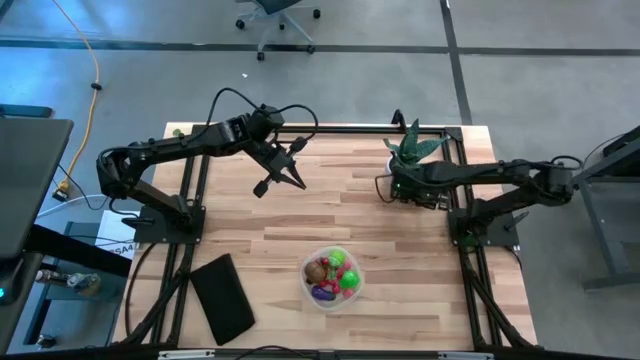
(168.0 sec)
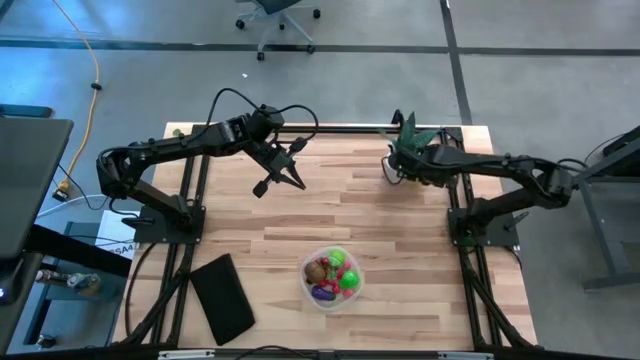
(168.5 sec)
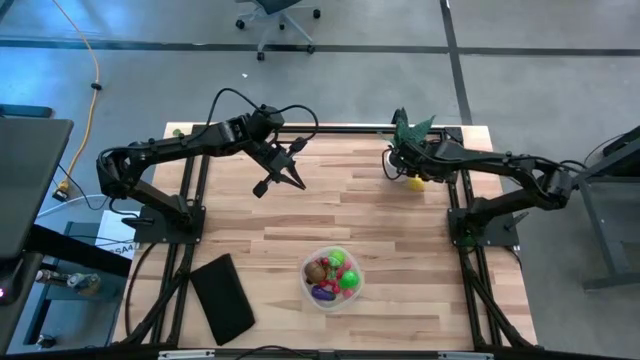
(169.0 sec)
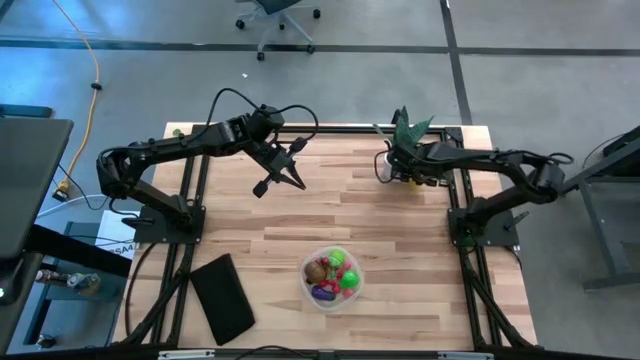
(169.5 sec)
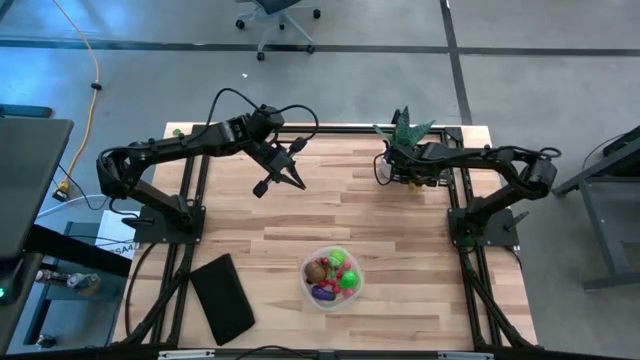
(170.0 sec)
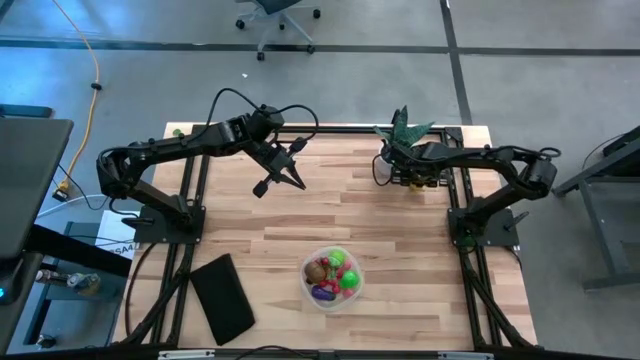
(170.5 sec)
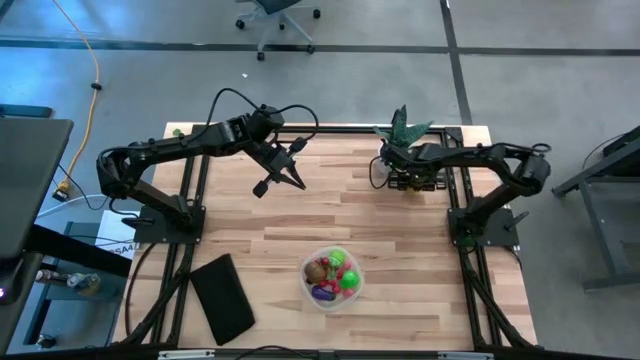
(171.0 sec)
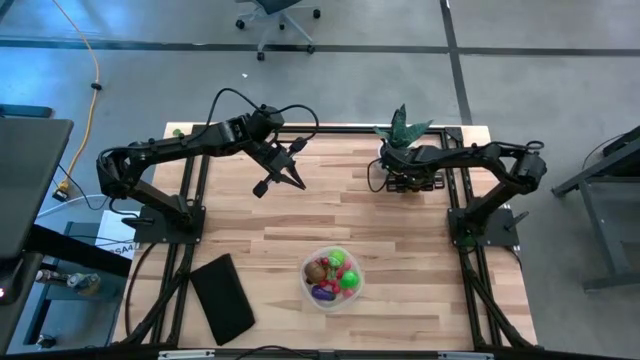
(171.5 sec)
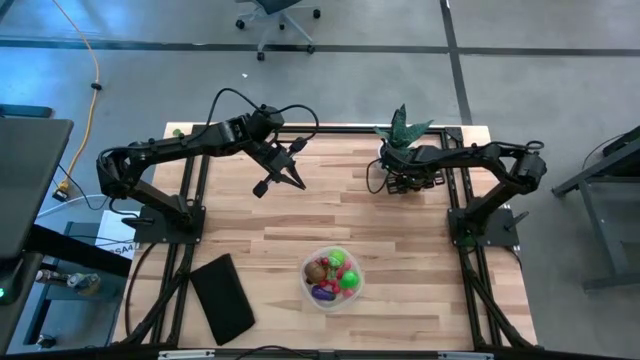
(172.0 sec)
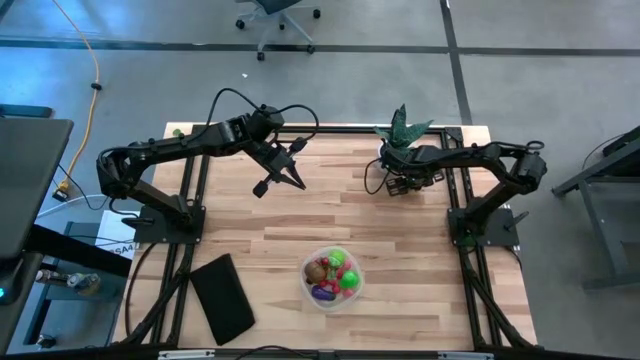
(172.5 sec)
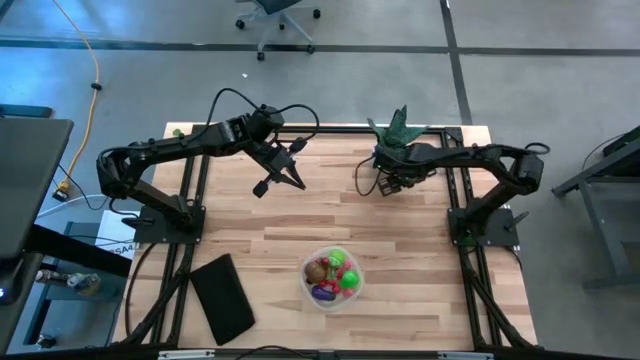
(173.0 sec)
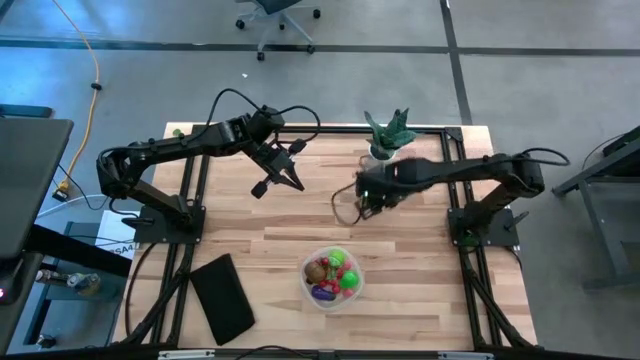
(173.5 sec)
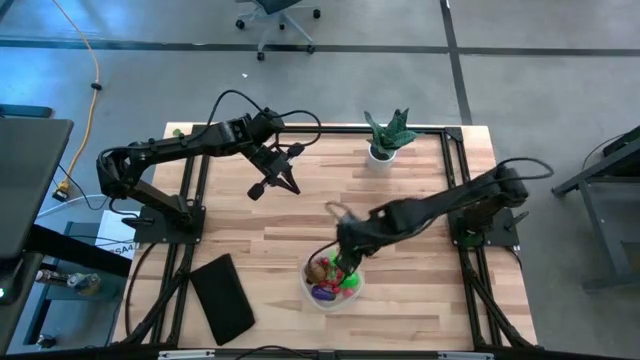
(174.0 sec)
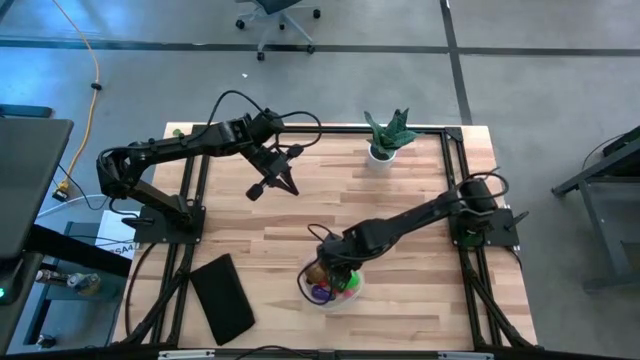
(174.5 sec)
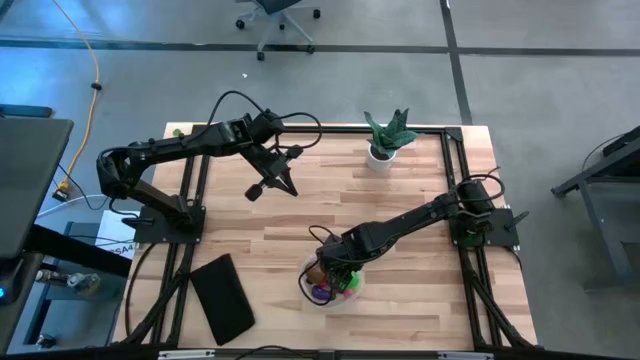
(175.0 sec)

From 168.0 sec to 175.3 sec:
Task: Pick and placing Produce into tupperware
Put the yellow lemon into the transparent container

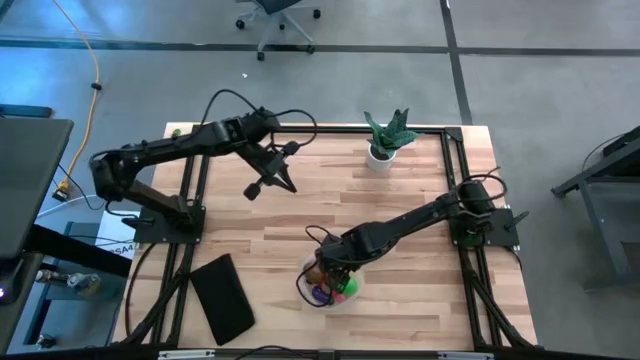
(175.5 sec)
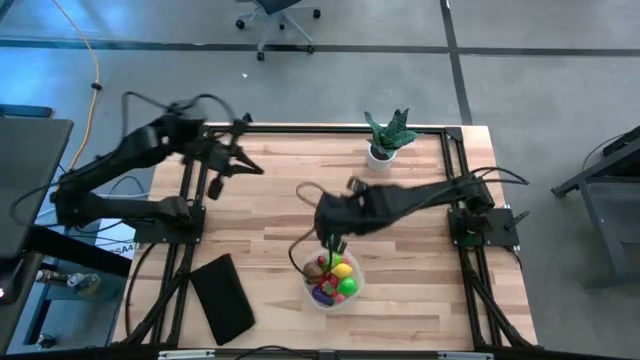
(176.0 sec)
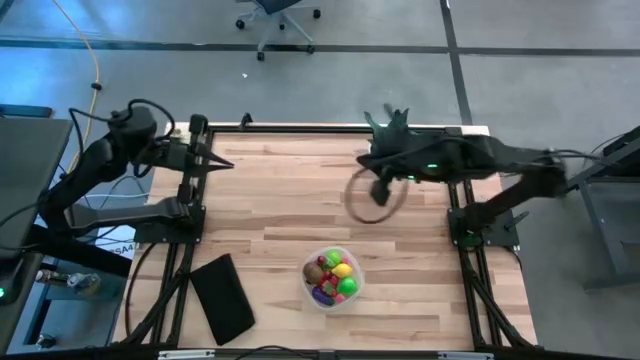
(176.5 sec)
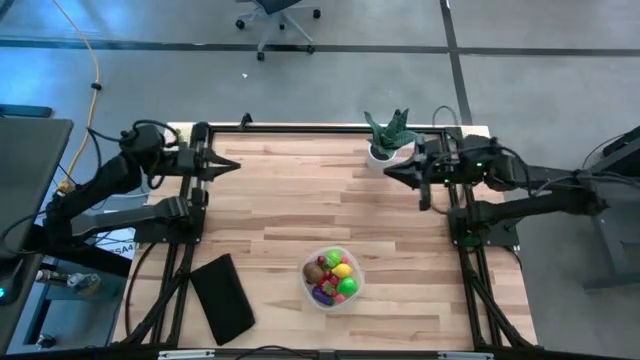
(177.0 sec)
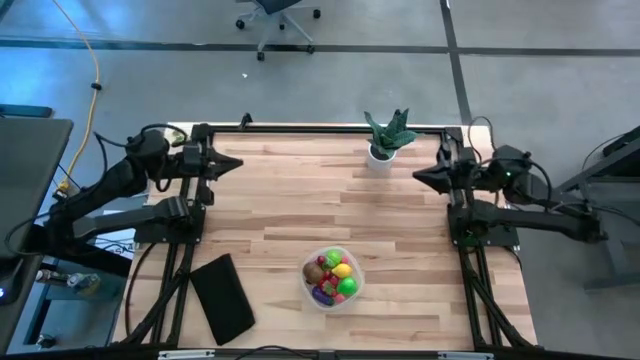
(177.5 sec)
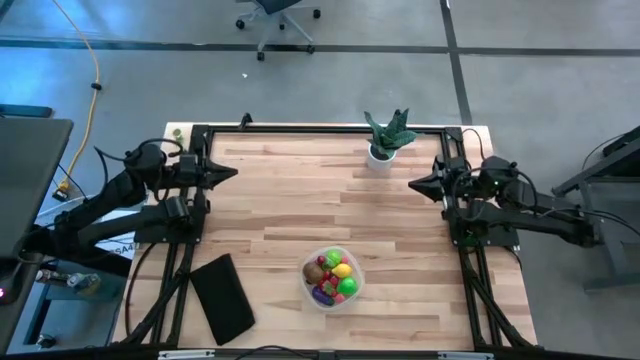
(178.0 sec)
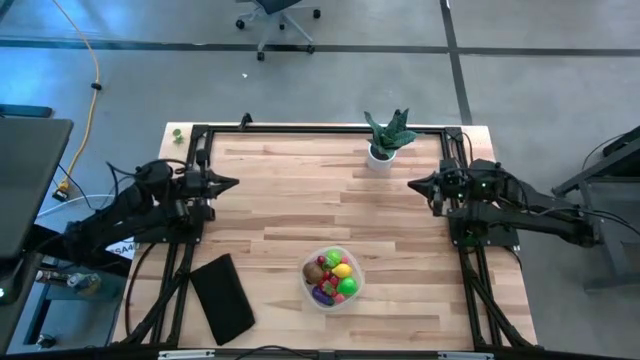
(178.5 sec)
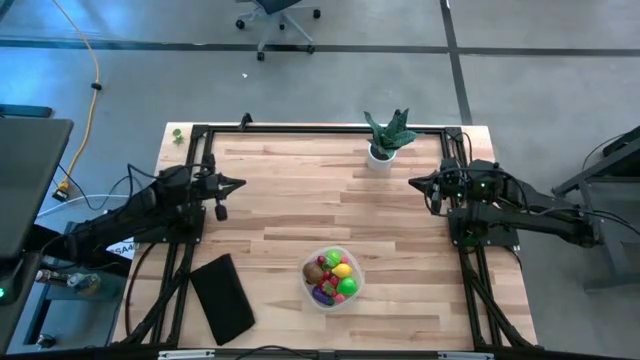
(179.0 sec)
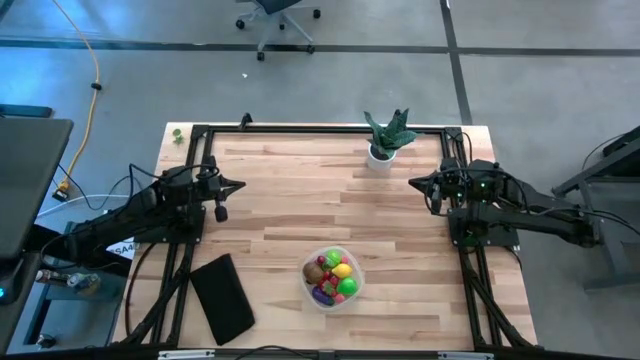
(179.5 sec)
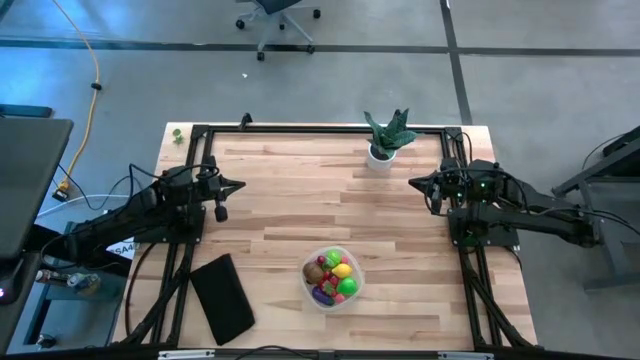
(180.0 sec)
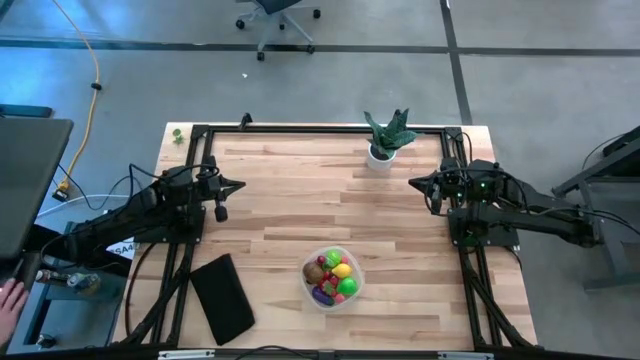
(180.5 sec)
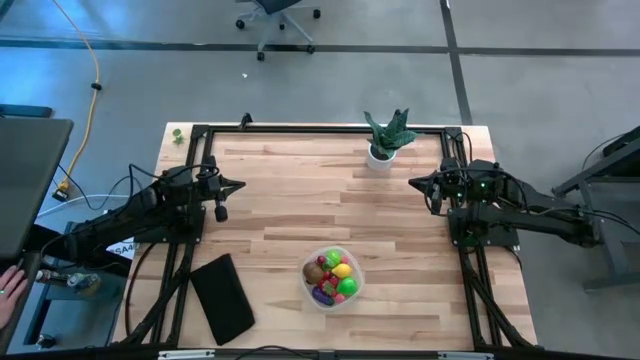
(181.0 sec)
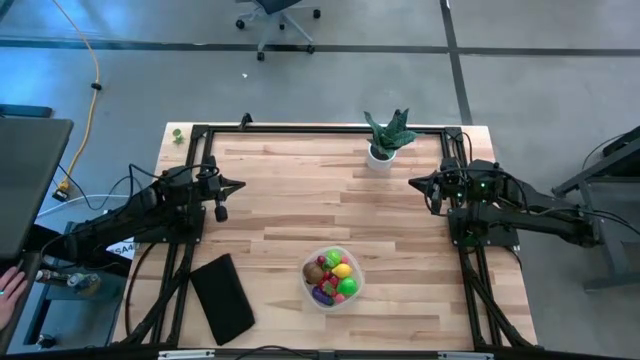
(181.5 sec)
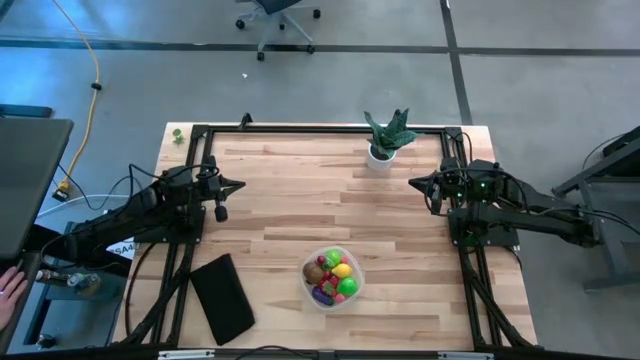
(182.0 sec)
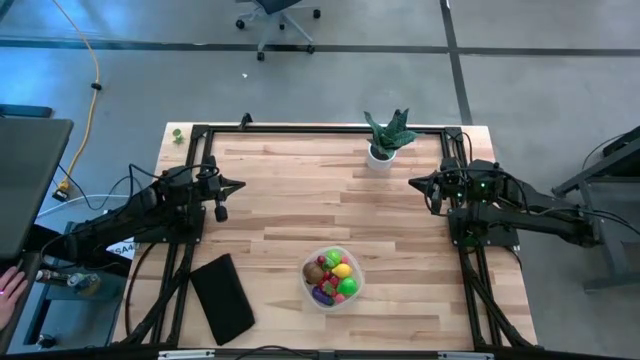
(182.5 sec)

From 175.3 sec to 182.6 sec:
Return to Home Position

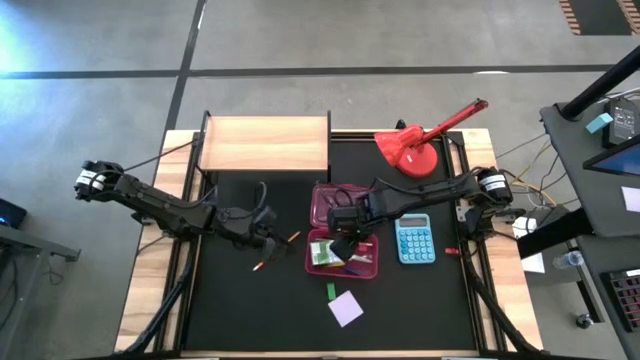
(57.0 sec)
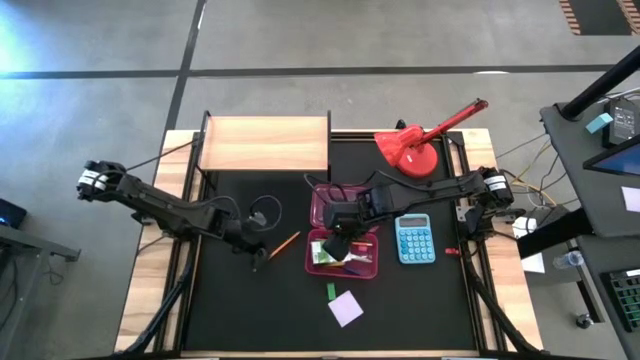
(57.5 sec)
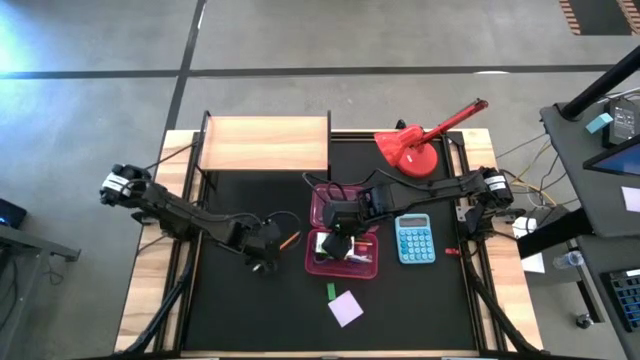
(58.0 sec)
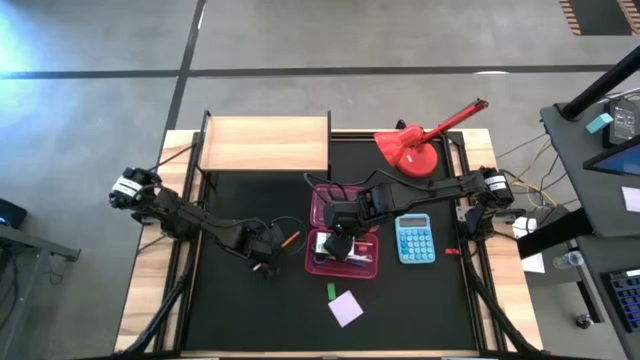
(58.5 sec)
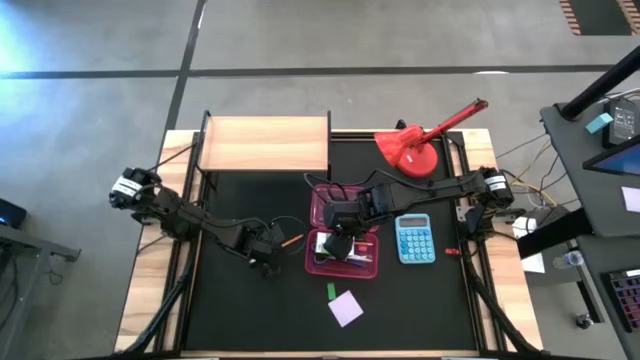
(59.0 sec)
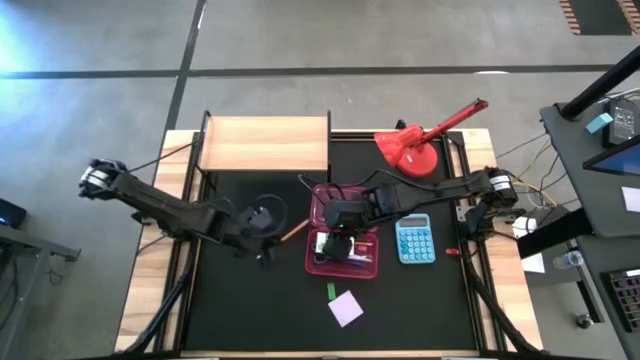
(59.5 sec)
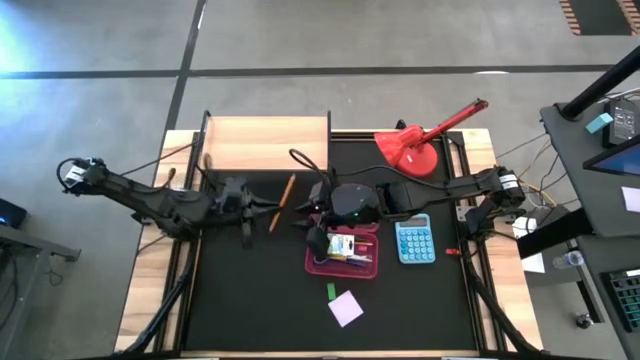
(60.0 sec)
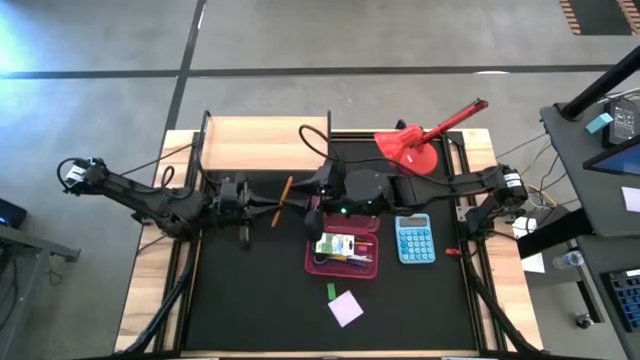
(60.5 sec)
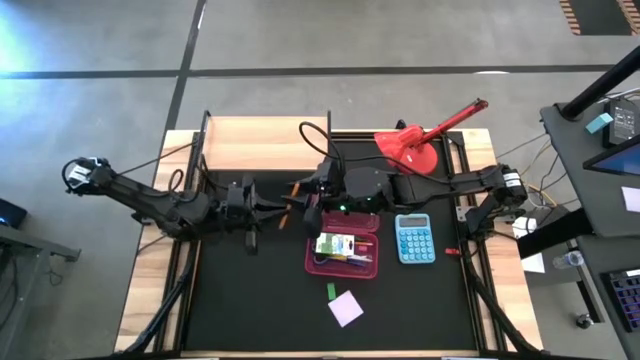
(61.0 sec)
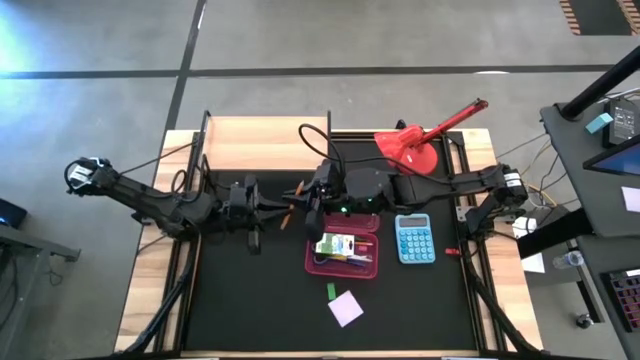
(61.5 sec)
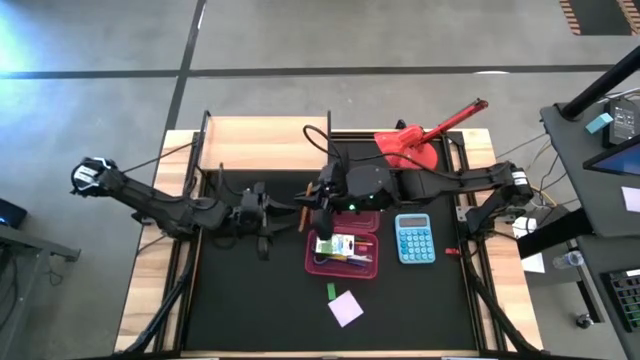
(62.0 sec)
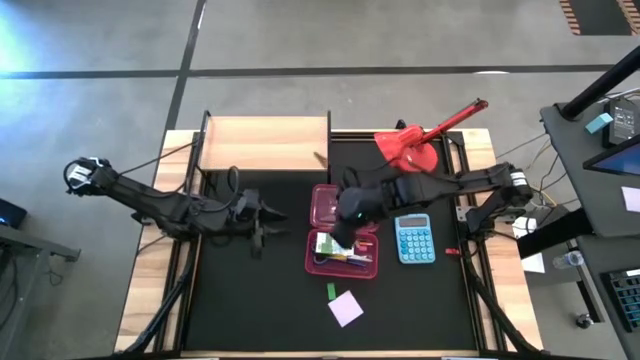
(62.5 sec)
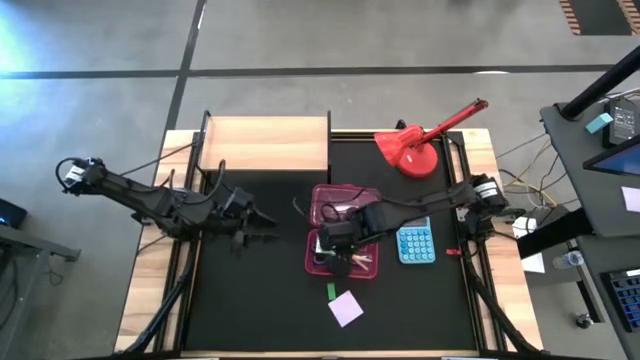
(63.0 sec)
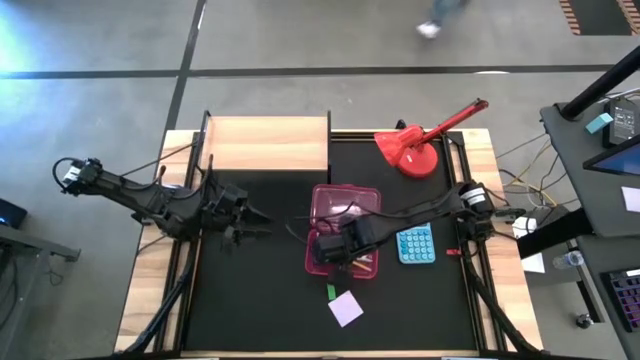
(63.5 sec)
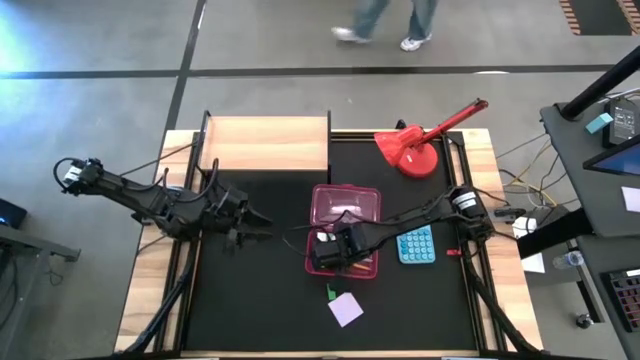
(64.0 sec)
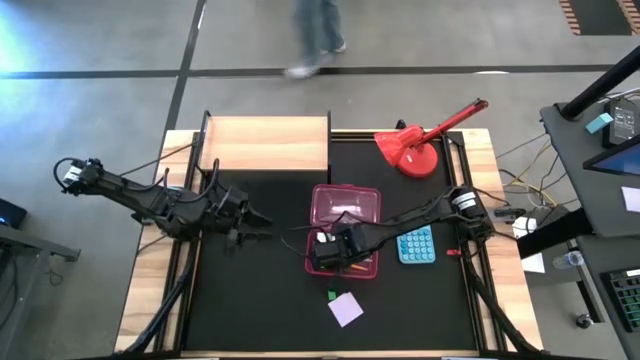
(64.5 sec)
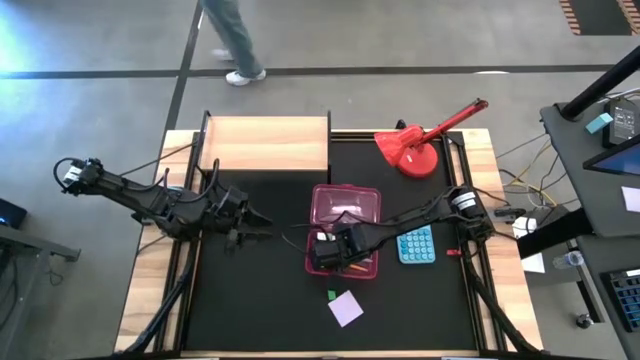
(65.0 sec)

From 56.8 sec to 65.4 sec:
Task: Pack school essentials
Put the orange pencil into the pink supply box
